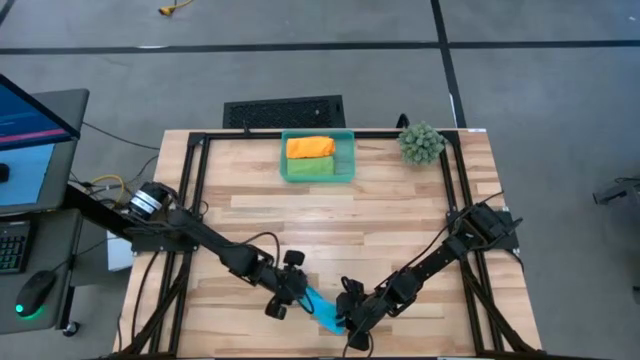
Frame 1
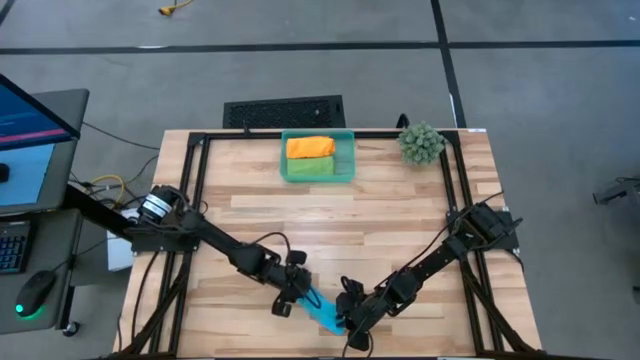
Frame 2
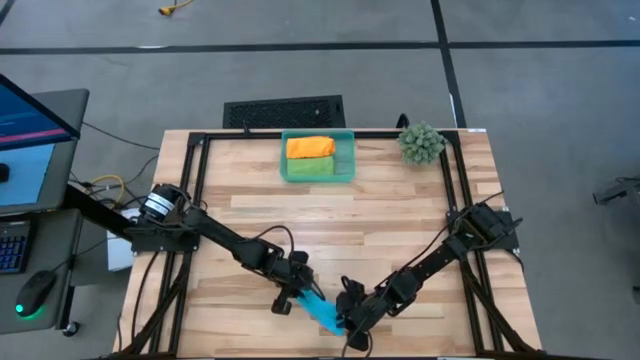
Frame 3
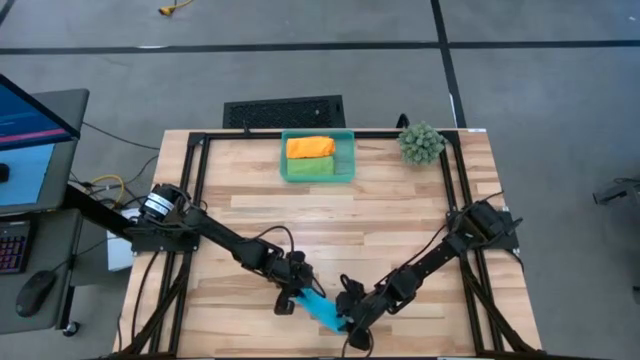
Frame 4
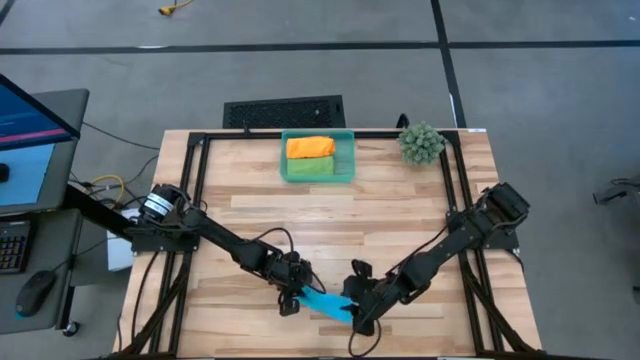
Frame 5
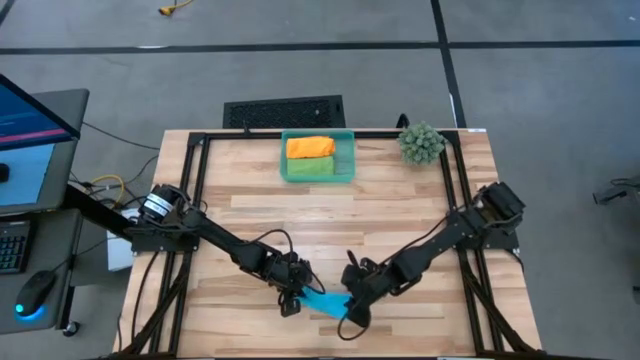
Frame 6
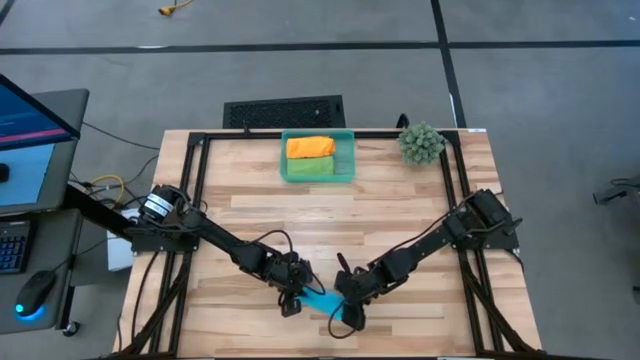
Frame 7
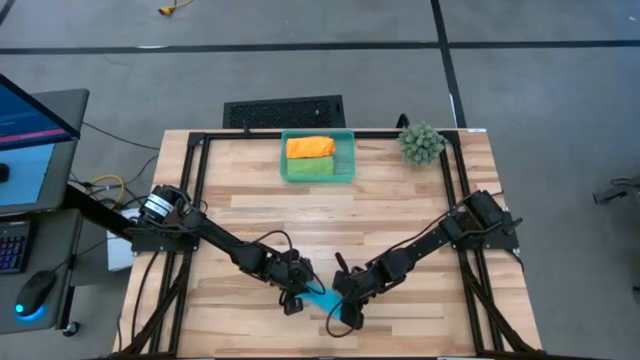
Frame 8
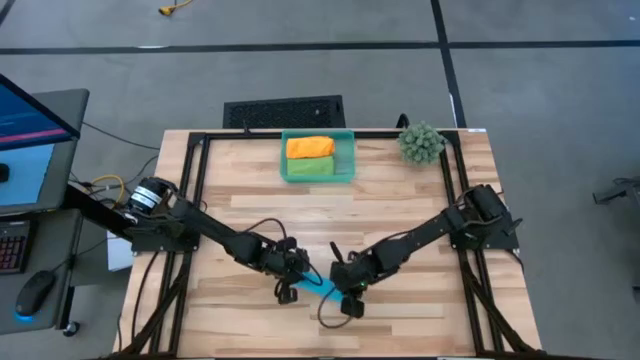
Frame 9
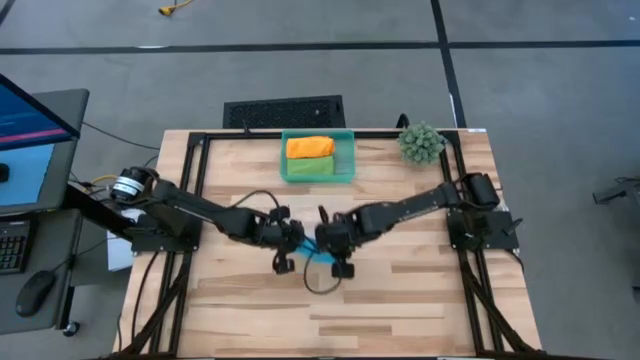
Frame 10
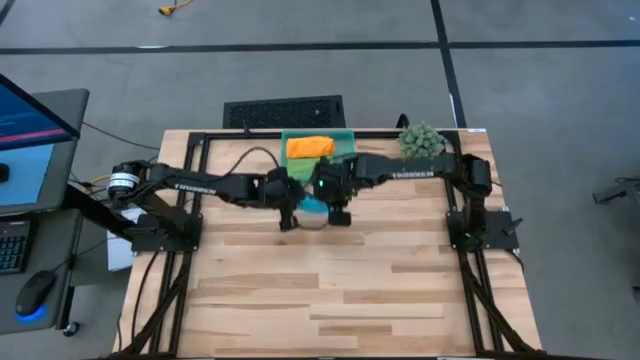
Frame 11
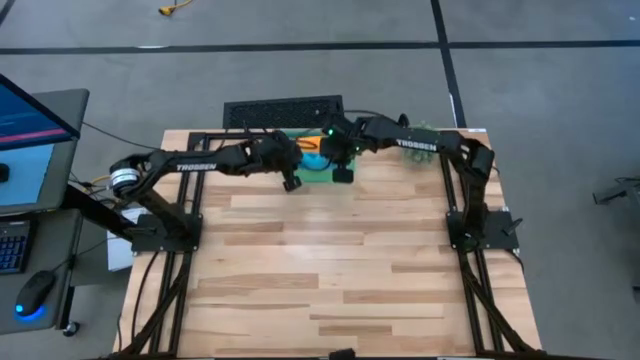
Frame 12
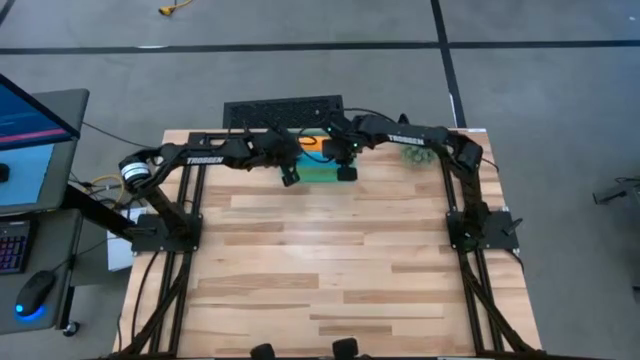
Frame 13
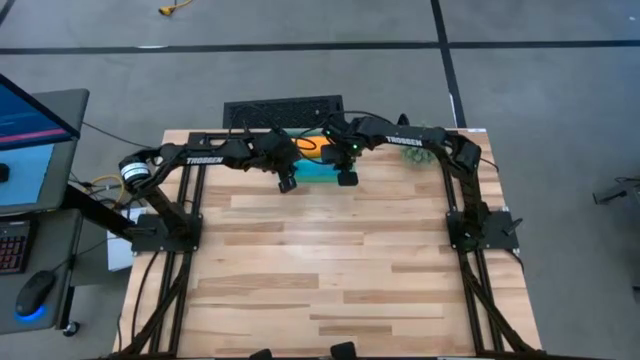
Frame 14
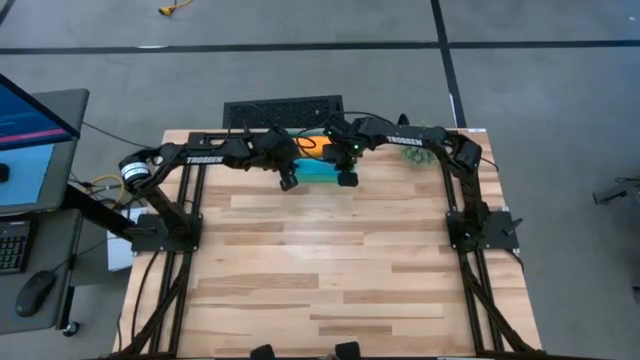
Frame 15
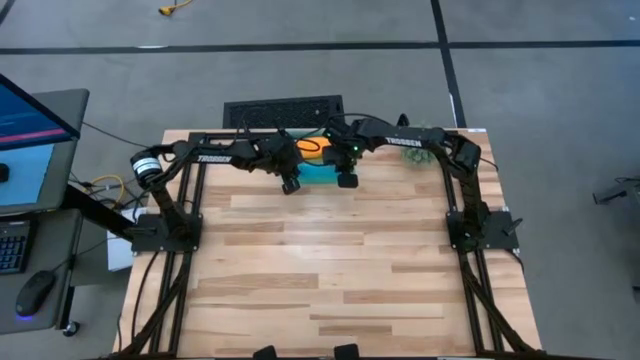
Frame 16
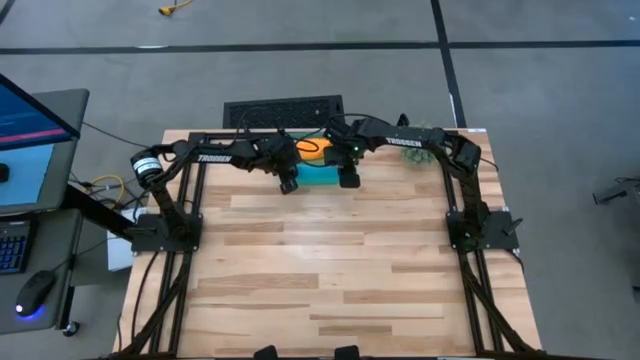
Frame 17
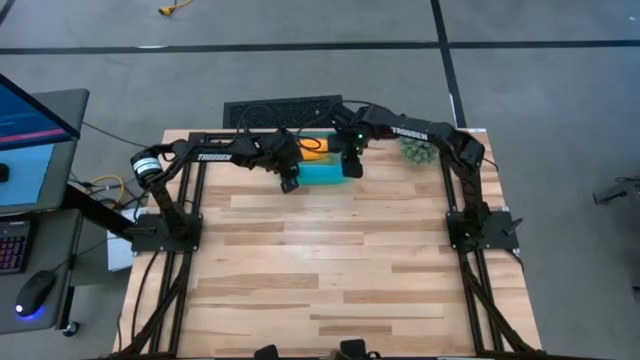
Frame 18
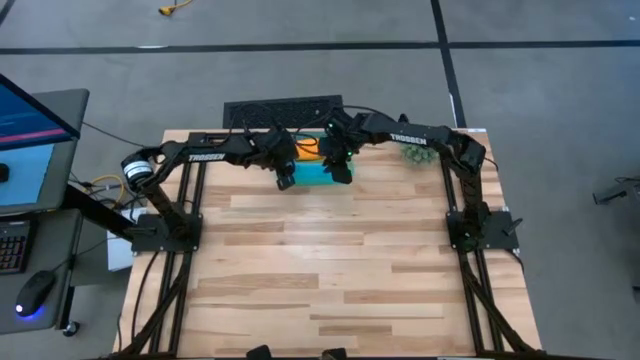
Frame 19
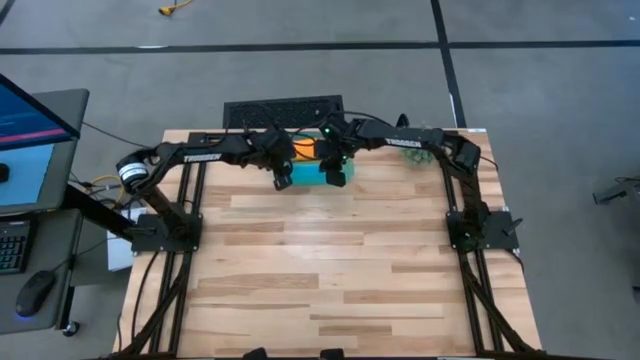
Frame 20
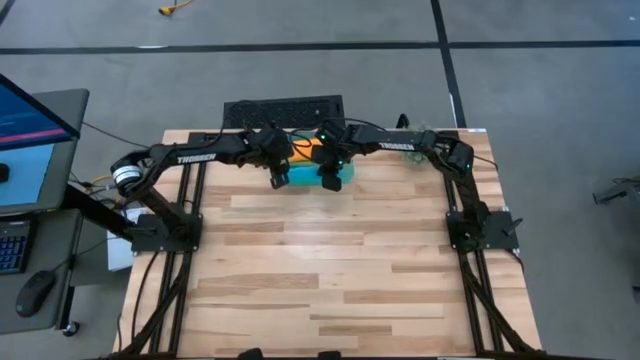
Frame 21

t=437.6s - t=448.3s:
Task: Roll microfiber towels into tight, uniform cylinder then place into a basket
Put the rolled blue microfiber cloth into the blue bin

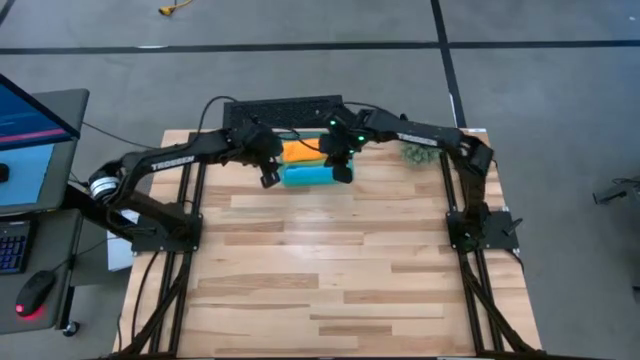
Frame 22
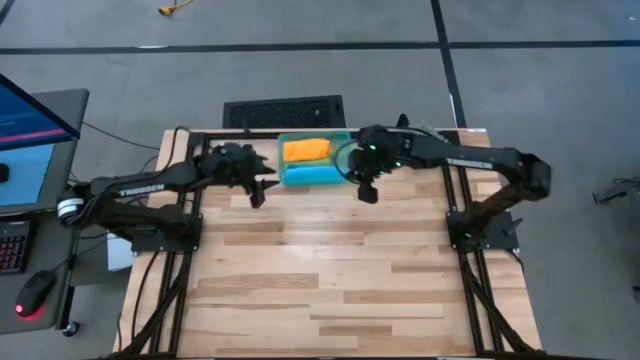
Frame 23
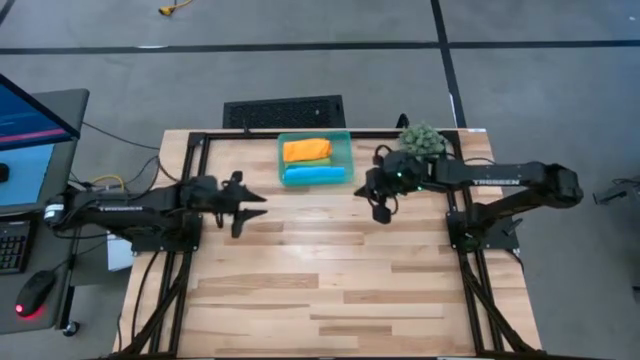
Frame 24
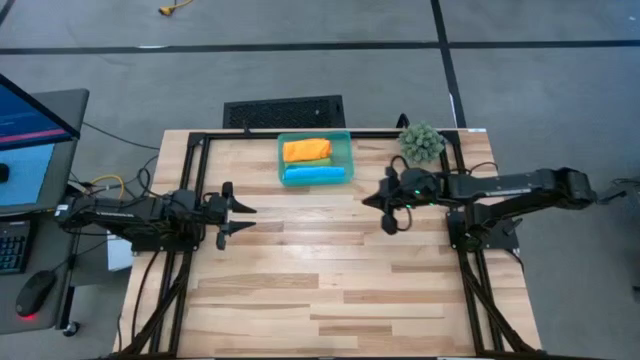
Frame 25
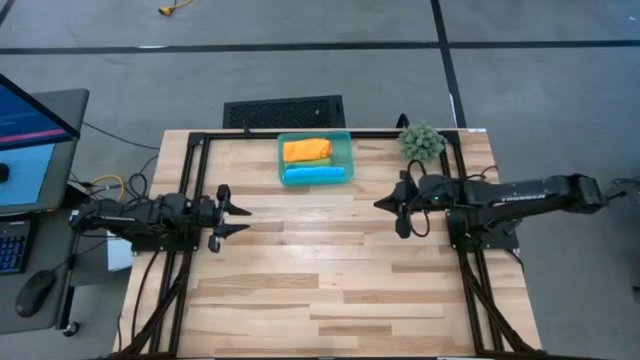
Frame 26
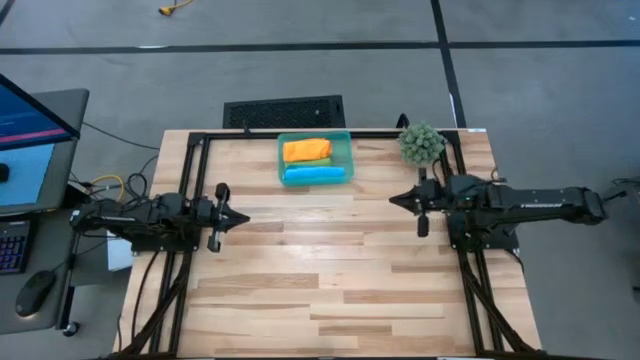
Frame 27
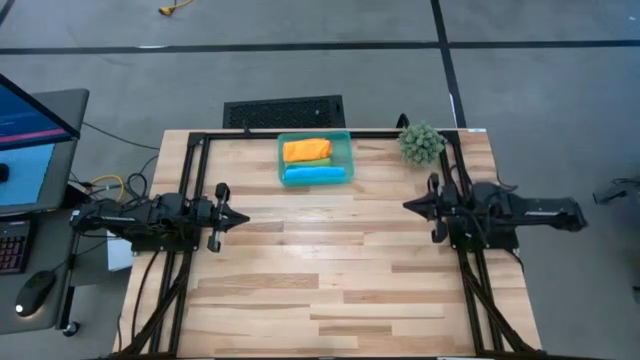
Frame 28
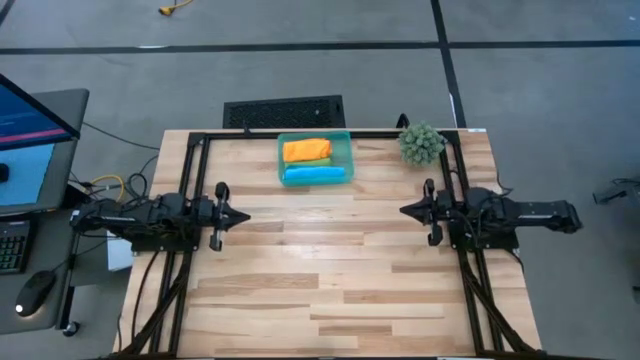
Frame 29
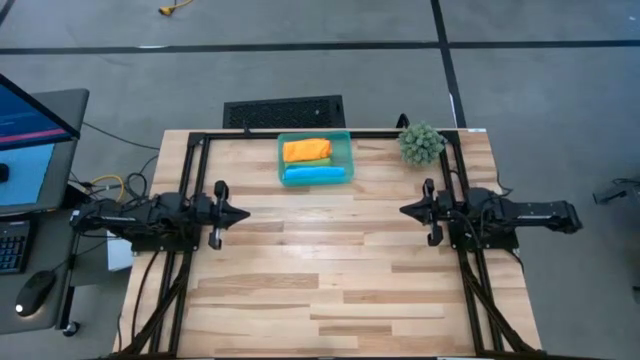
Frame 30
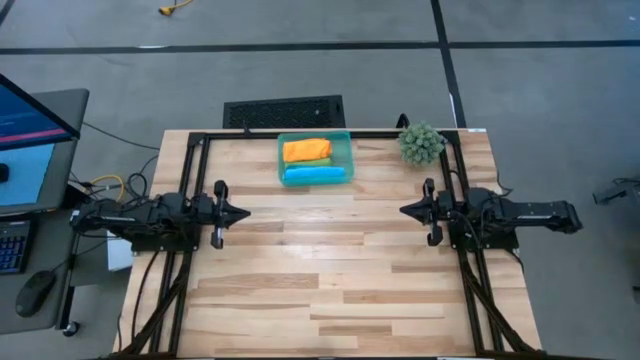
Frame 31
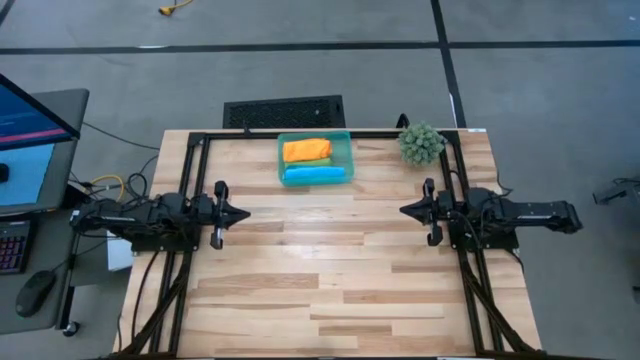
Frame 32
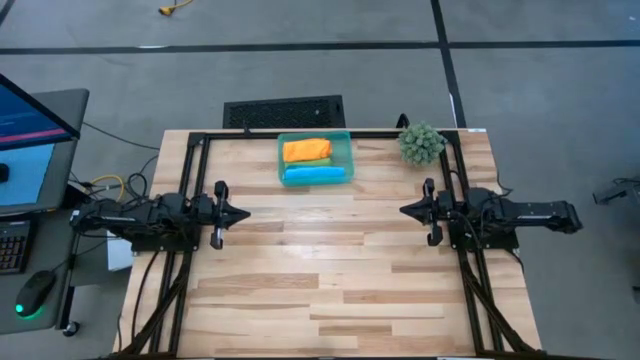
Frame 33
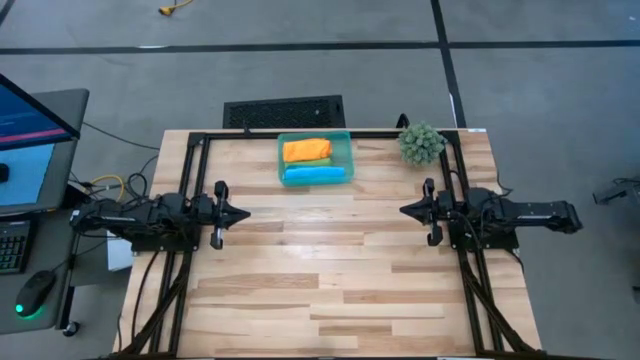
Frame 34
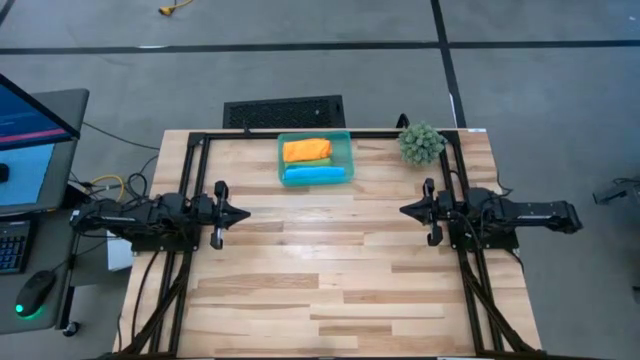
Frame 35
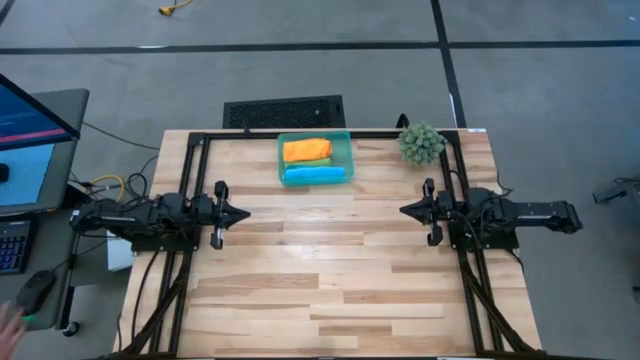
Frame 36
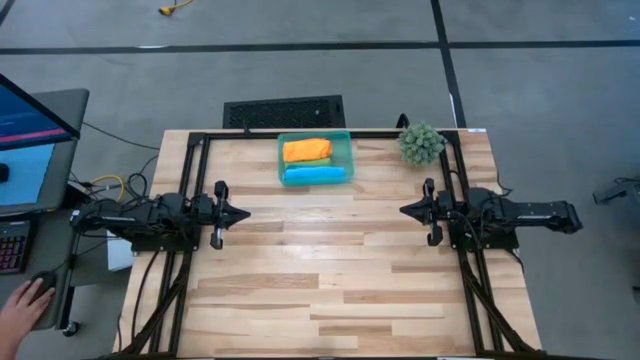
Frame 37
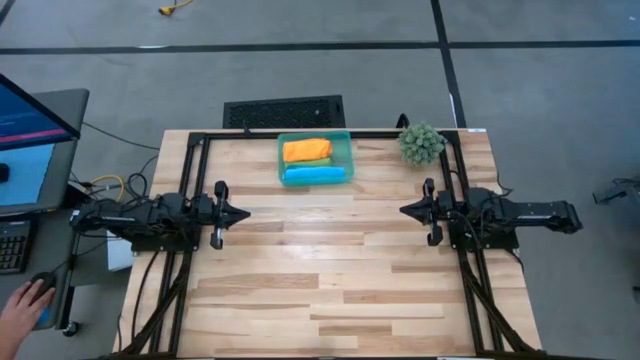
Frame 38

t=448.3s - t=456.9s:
Return to Home Position

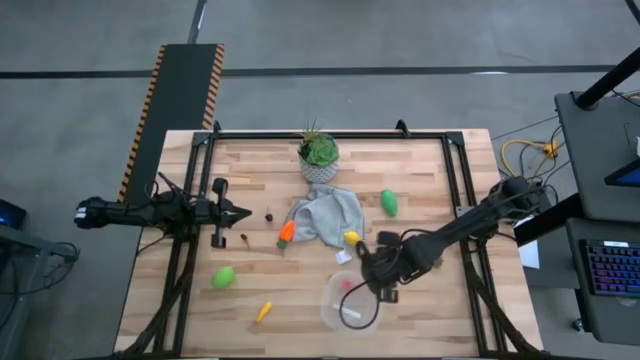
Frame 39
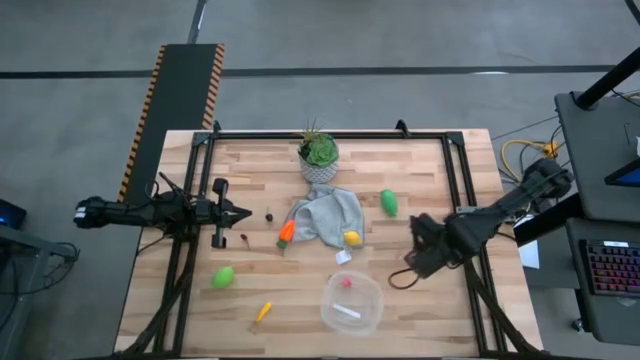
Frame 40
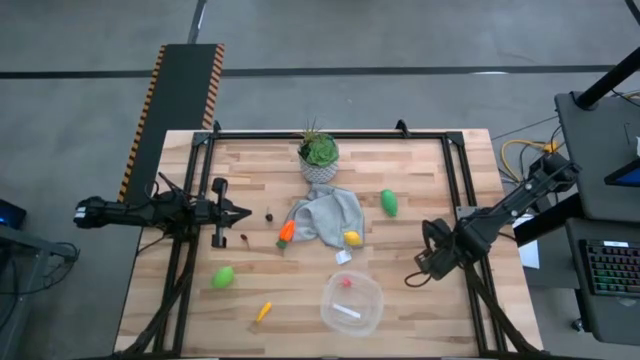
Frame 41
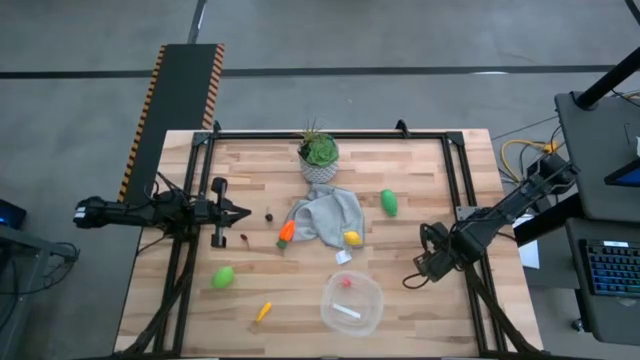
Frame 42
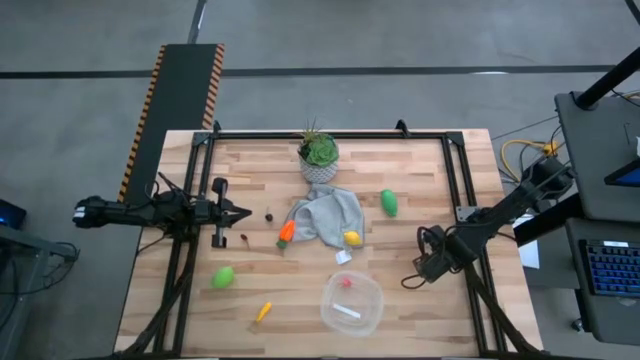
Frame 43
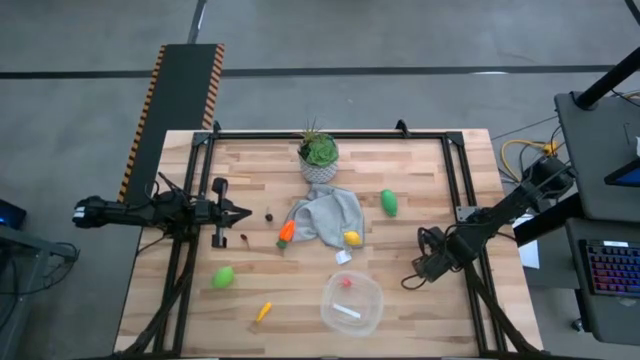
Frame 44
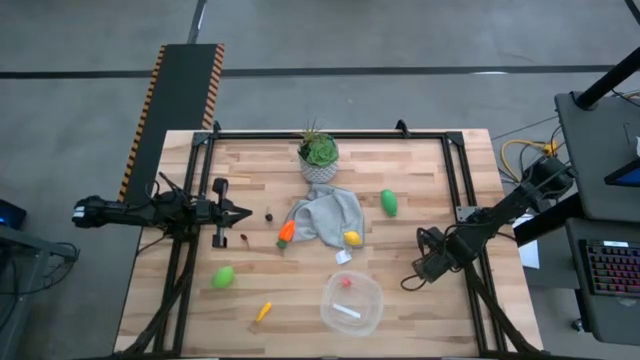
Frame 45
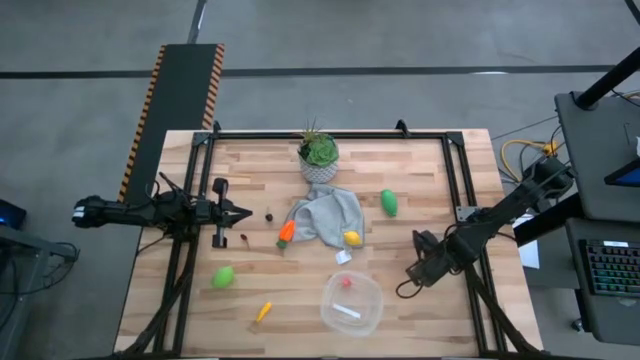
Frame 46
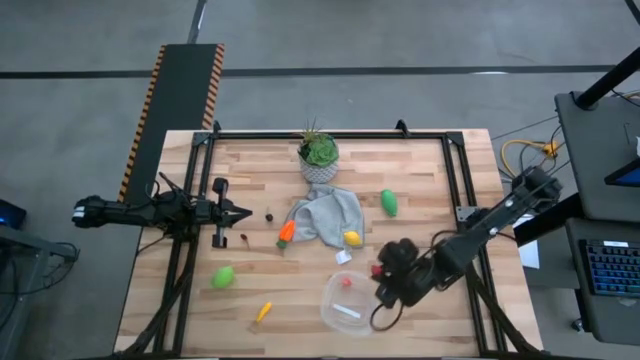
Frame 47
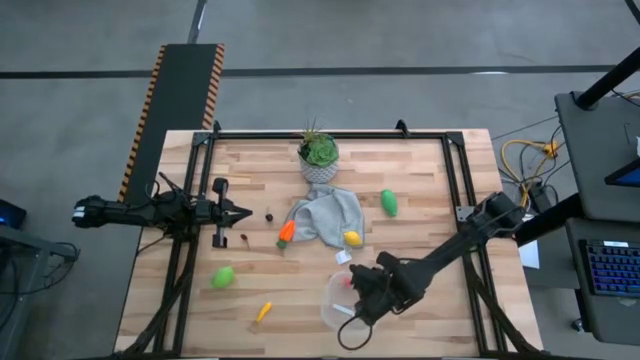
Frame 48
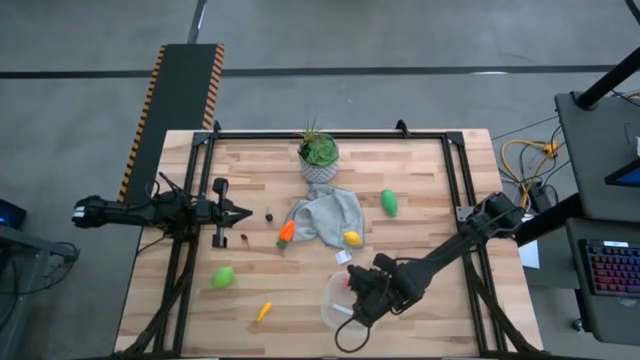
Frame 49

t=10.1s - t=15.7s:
Task: Pick and placing Produce into tupperware
Put the strawberry into the transparent bin
